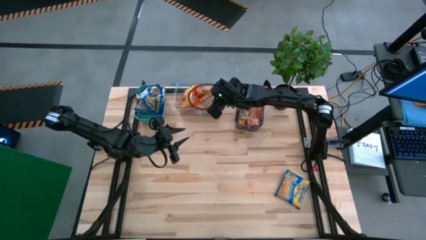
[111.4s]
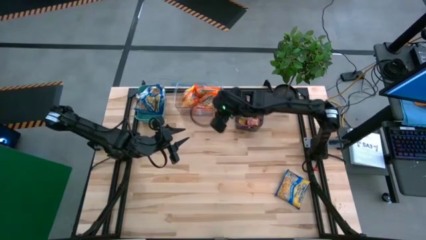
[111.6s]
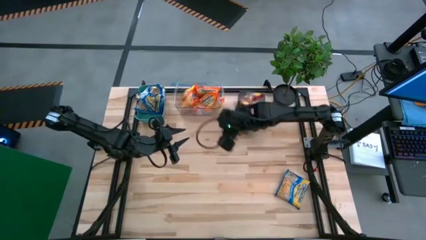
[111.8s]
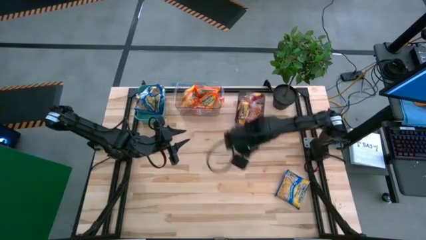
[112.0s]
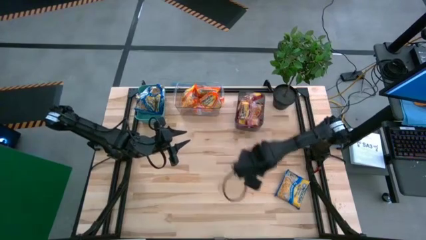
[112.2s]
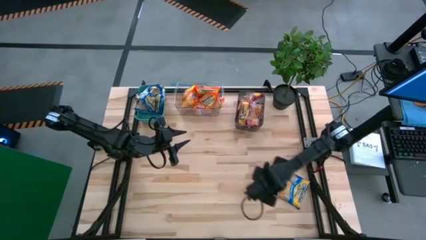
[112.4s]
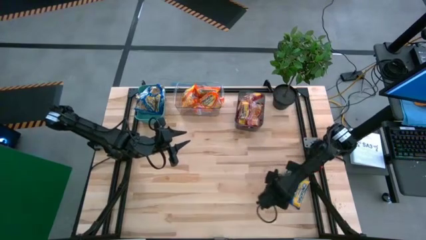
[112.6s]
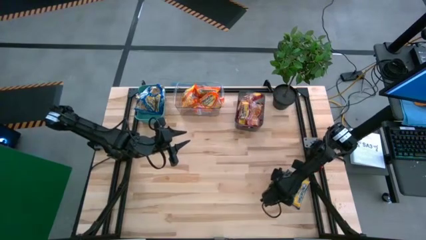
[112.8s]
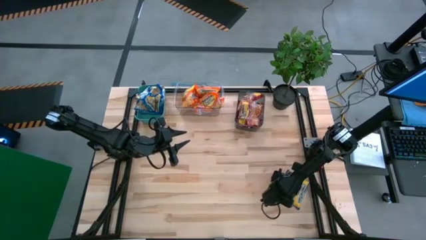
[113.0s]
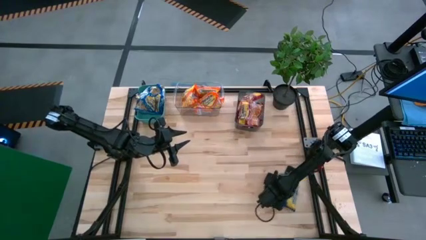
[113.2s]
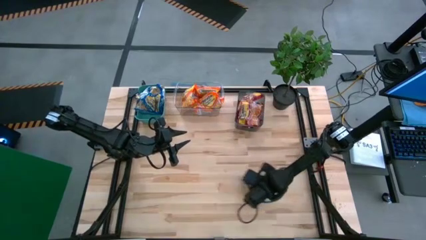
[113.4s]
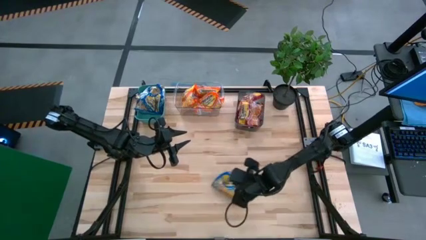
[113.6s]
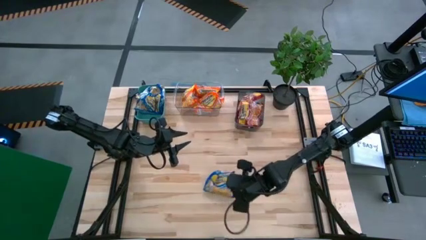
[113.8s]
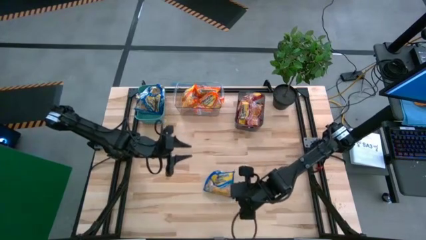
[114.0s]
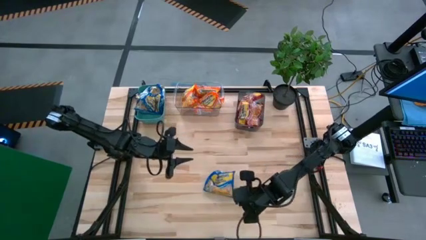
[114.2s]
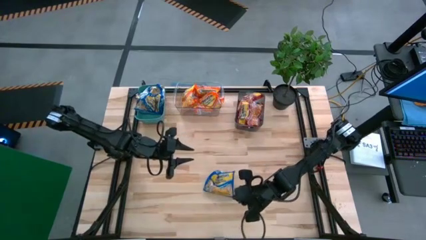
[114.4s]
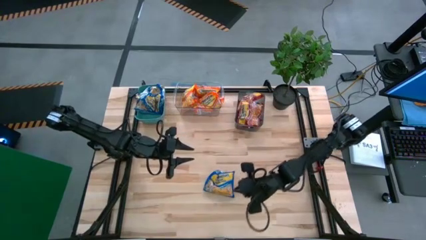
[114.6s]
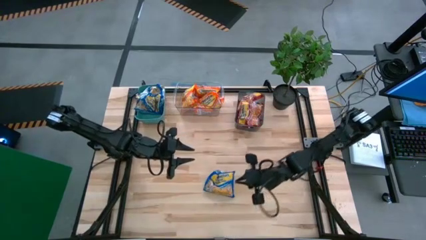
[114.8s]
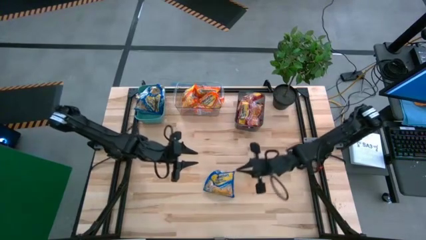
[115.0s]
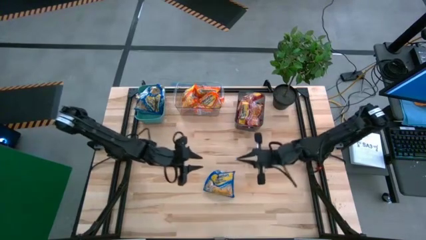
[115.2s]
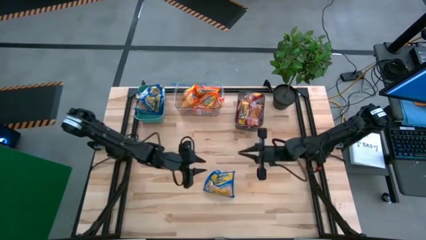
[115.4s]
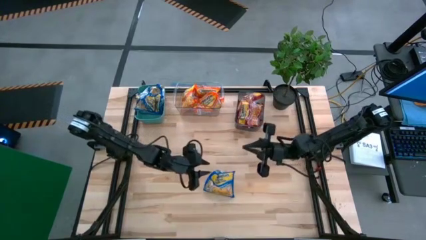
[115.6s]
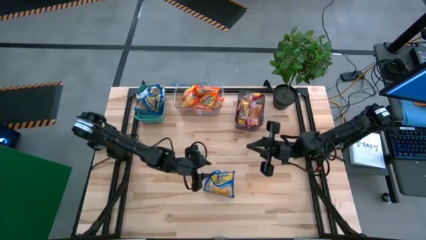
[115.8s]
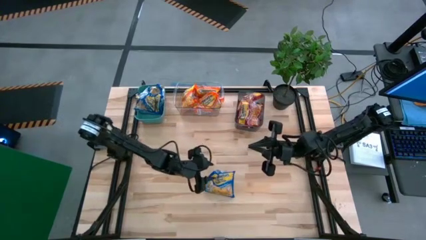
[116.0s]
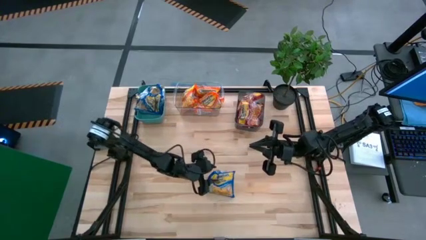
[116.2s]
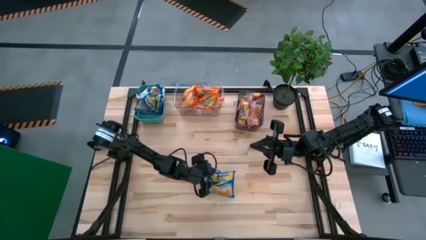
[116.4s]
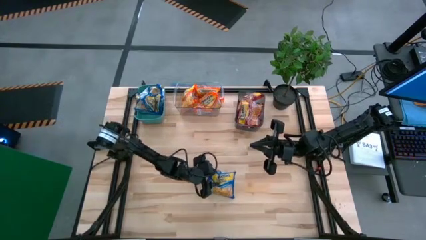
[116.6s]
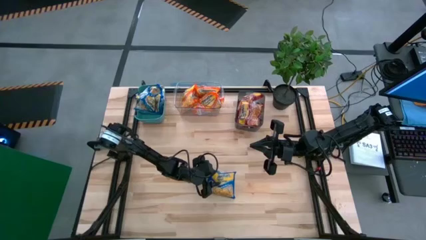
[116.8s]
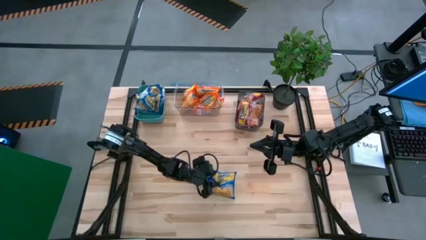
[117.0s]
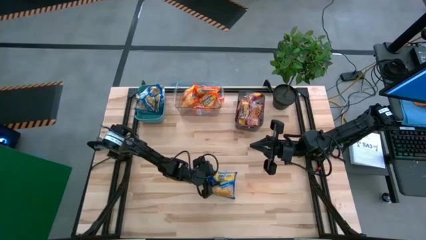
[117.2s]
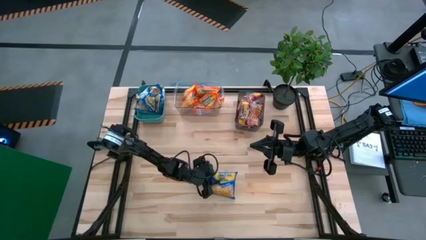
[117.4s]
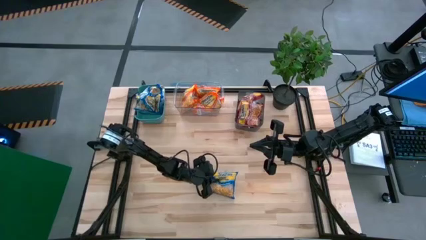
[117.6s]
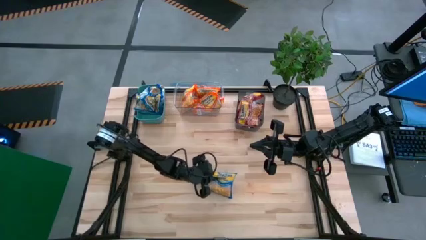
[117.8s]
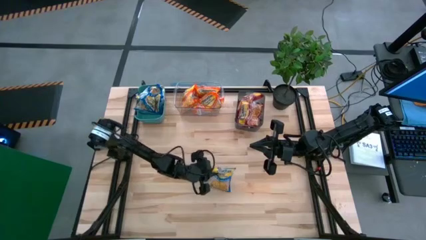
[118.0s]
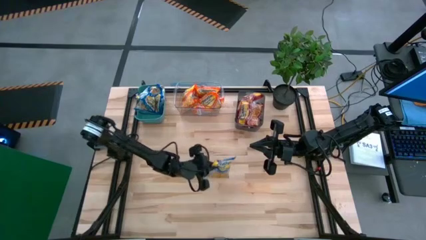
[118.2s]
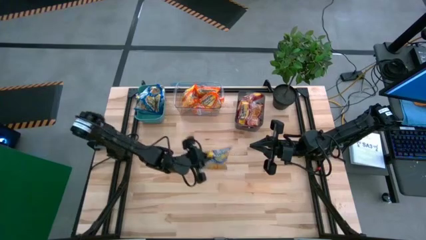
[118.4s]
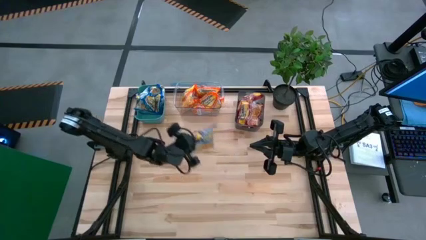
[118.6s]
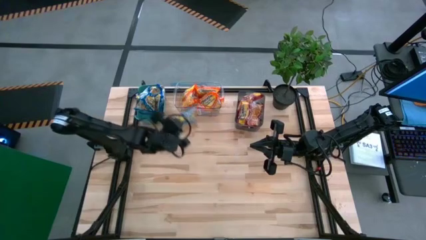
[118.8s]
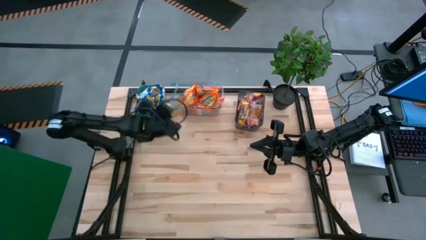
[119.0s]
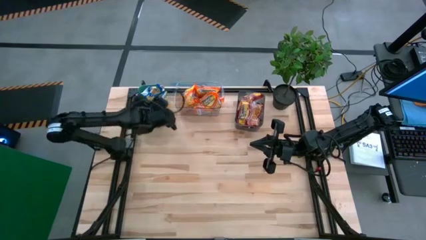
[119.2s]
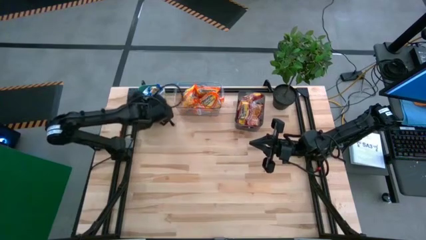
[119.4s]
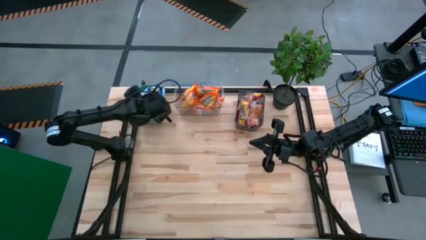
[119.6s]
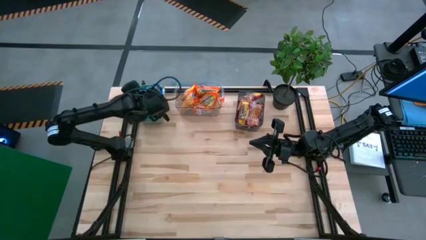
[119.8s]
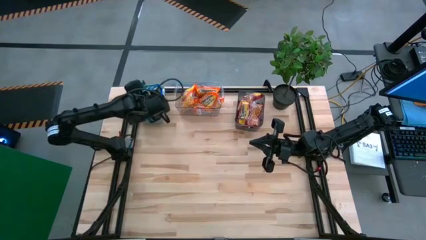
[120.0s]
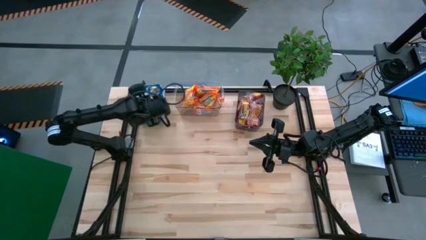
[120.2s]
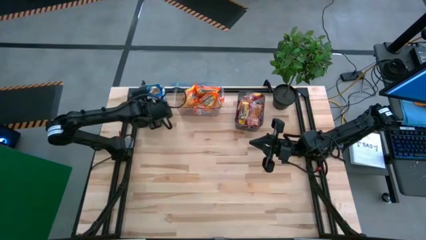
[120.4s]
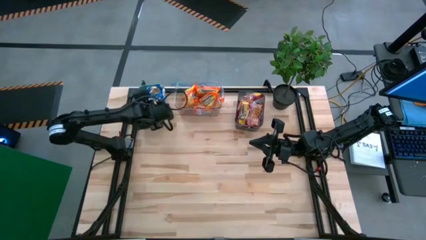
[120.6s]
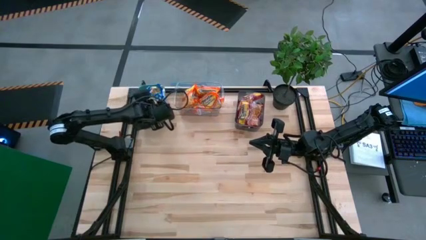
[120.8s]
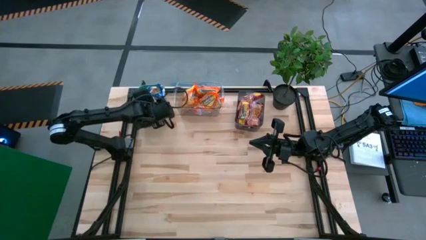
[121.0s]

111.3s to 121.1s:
Task: Sort Maruchan noodles
Put the blue noodle pack into the green bin

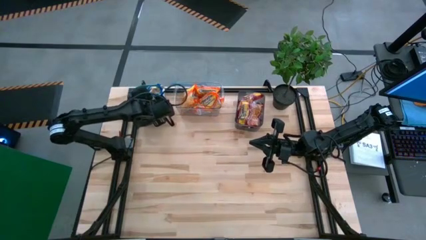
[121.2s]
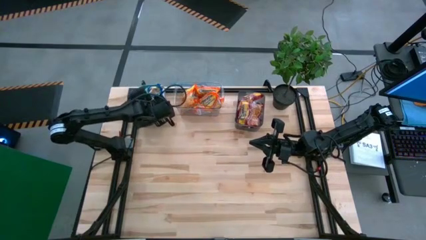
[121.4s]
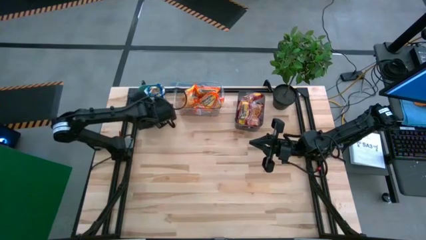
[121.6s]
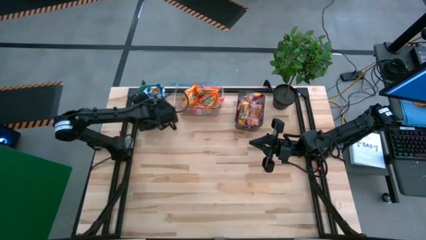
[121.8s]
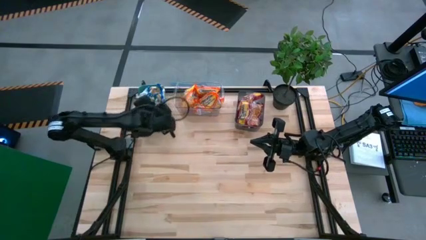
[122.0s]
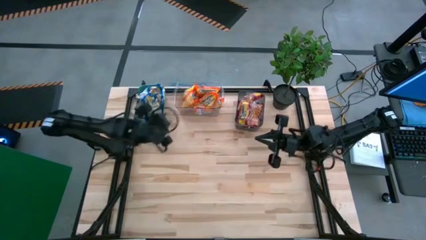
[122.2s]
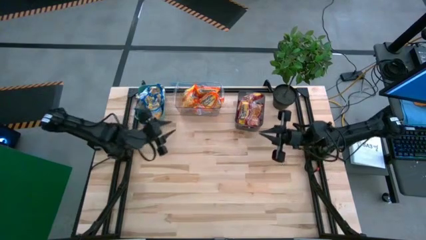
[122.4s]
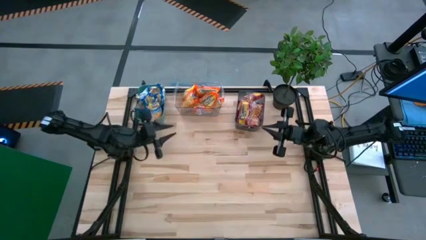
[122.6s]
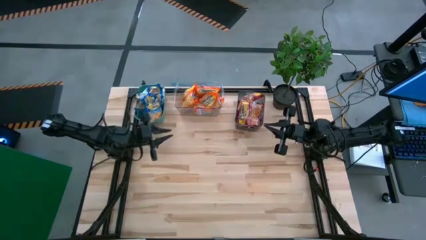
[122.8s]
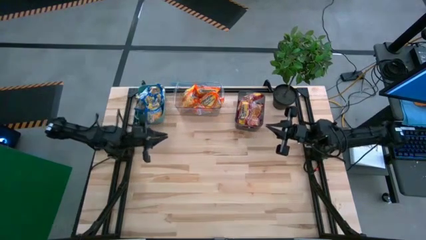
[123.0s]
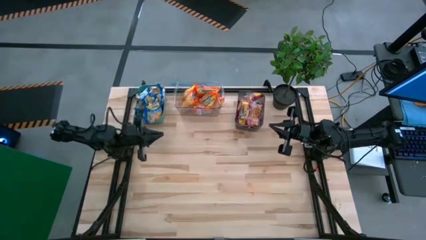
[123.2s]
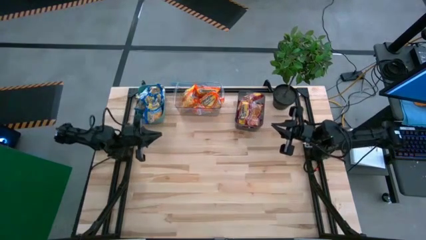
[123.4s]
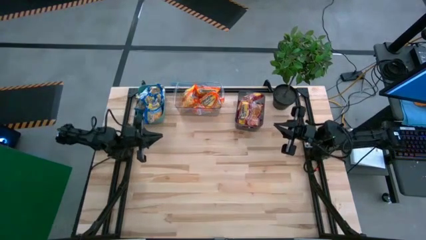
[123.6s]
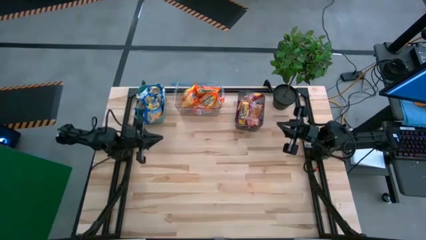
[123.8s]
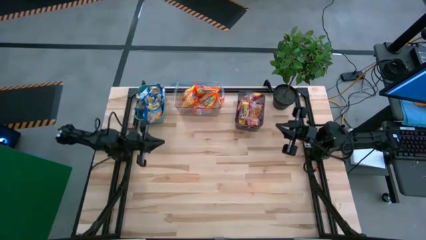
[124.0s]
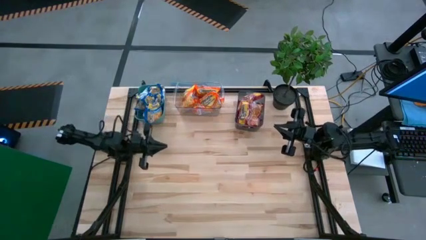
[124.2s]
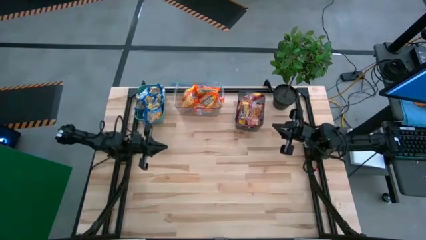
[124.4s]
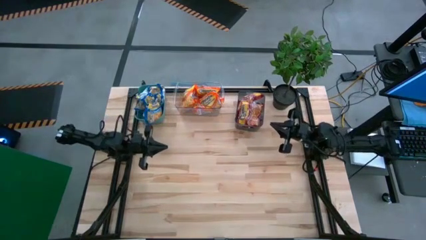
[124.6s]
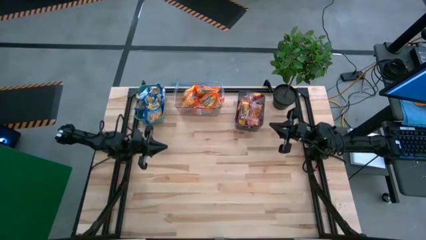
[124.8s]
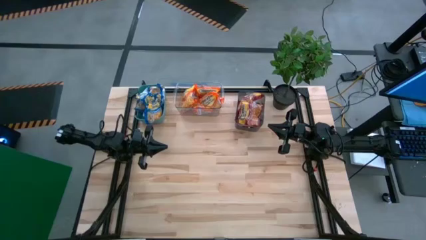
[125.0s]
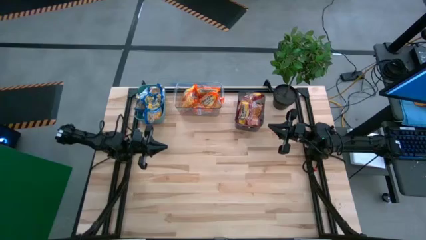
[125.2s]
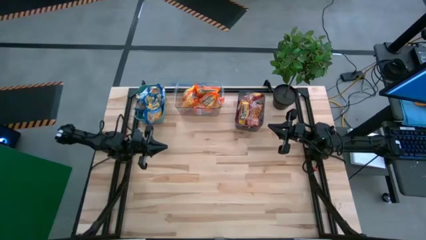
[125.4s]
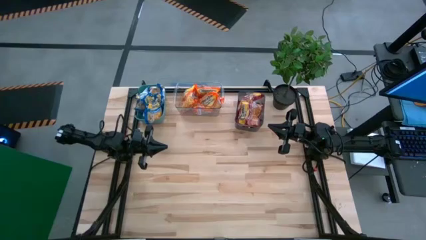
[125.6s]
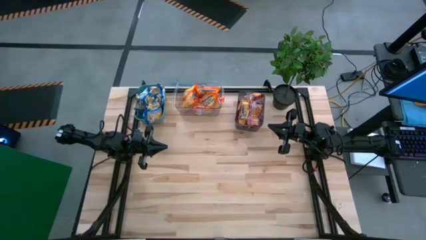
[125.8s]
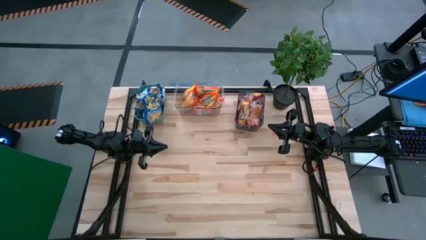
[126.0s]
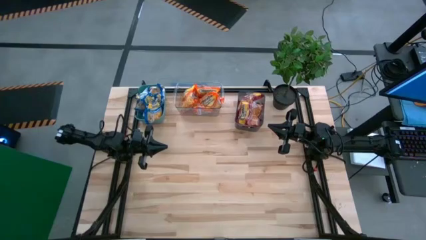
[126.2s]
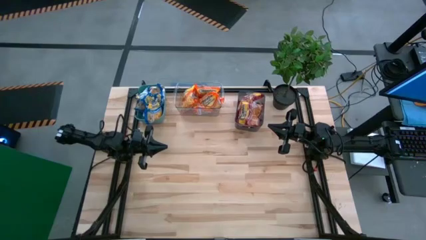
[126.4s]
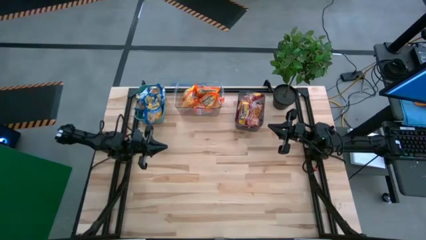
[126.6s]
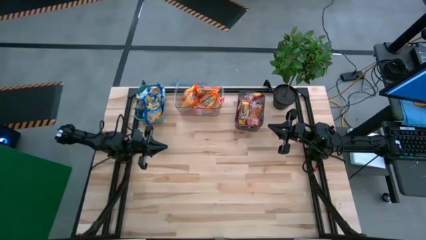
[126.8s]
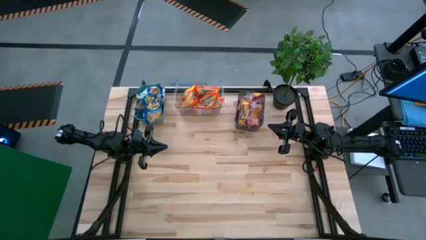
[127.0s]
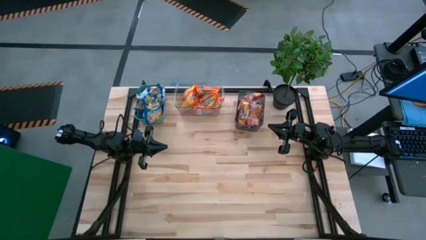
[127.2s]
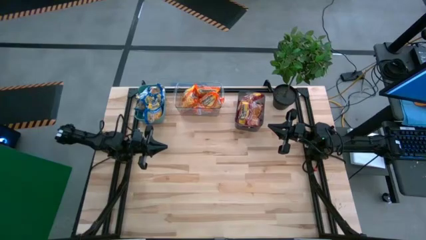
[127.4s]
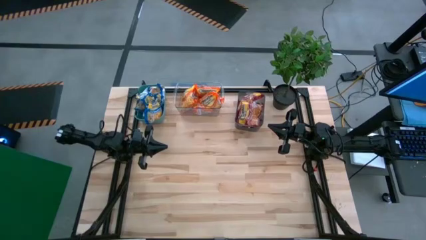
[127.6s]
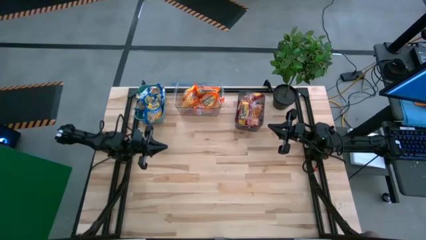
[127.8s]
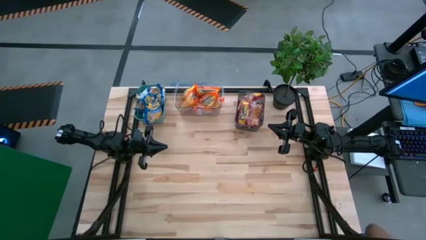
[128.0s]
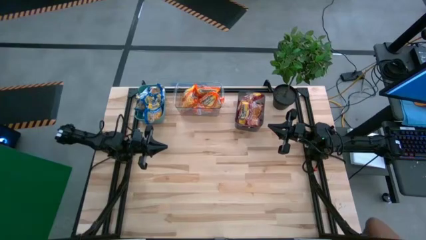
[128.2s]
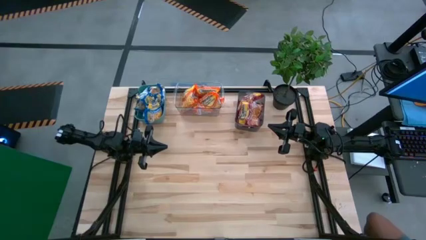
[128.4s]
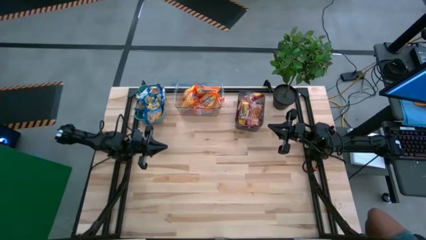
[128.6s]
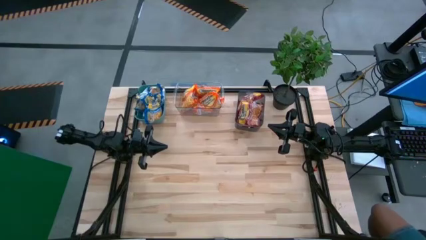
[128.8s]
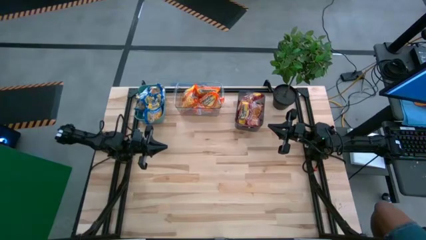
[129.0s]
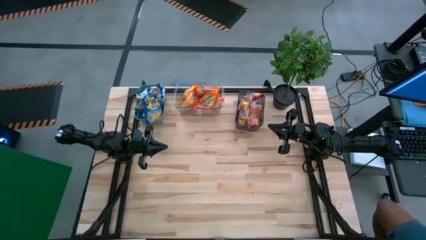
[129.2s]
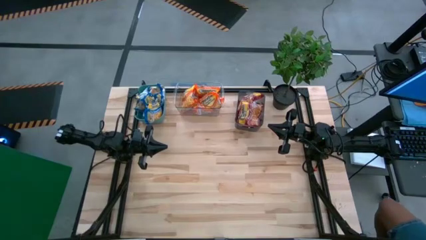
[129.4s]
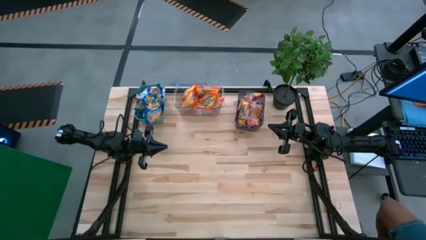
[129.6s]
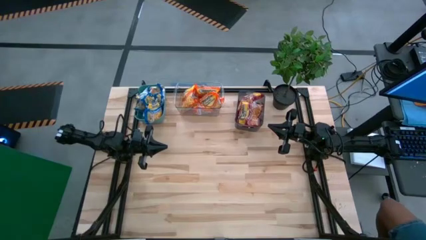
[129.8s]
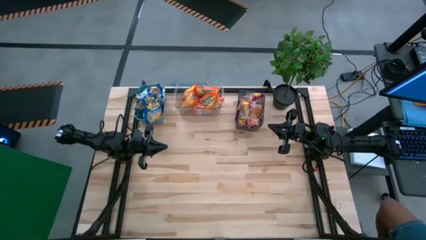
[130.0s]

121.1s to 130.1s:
Return to Home Position
